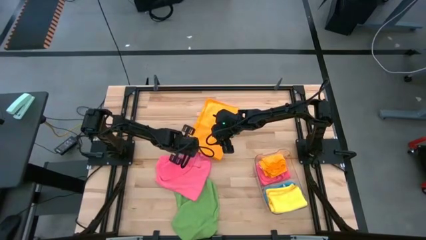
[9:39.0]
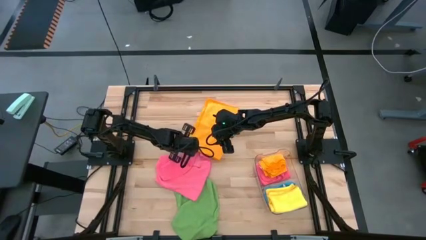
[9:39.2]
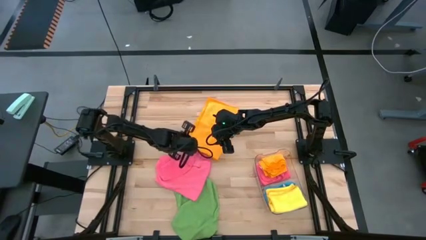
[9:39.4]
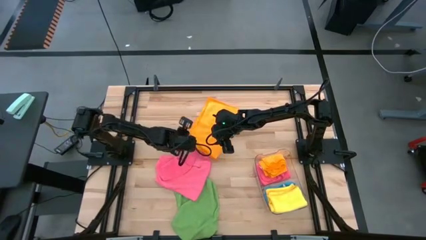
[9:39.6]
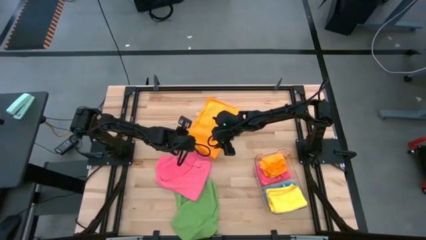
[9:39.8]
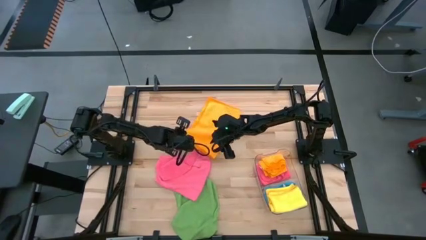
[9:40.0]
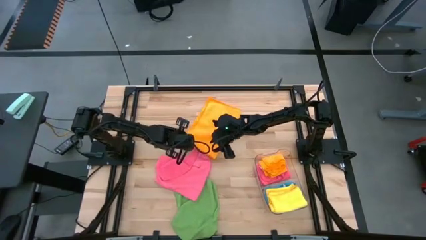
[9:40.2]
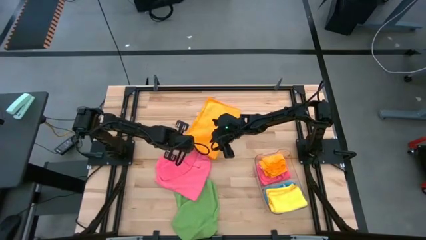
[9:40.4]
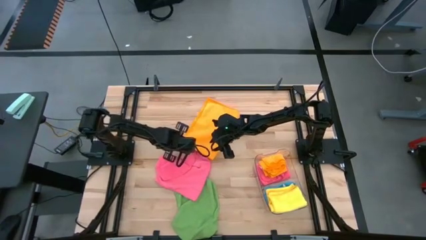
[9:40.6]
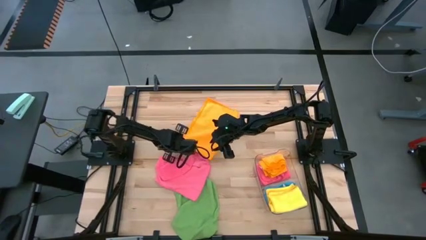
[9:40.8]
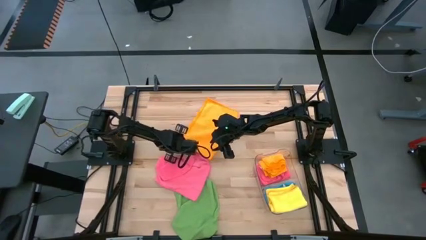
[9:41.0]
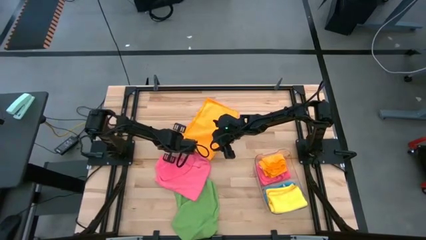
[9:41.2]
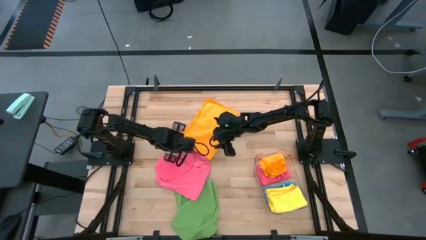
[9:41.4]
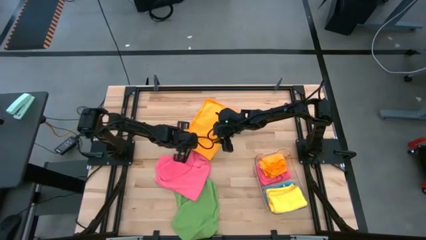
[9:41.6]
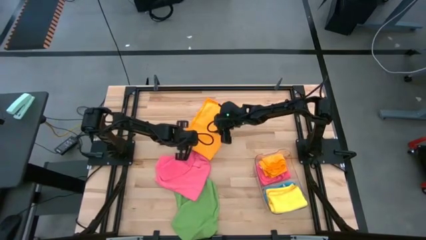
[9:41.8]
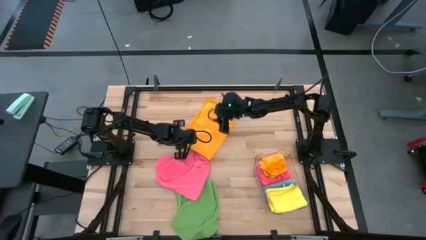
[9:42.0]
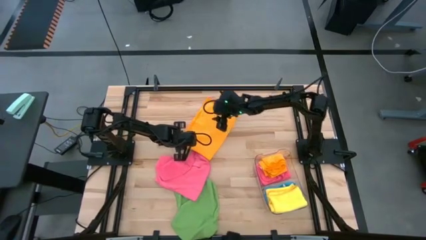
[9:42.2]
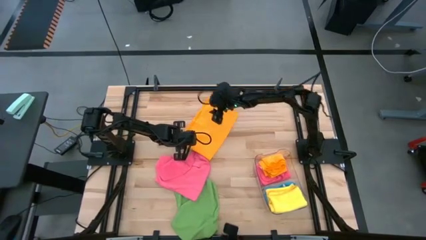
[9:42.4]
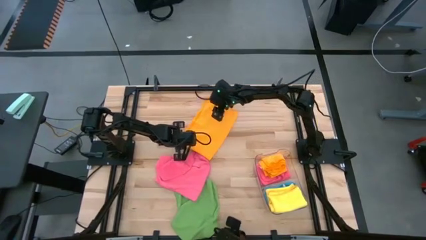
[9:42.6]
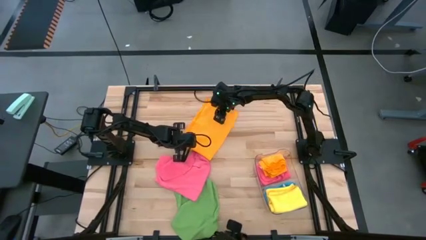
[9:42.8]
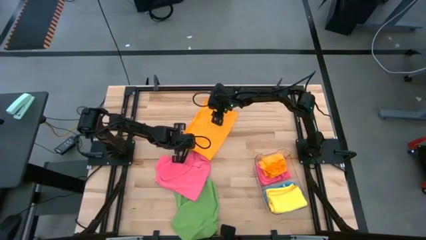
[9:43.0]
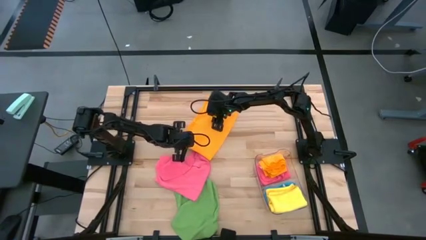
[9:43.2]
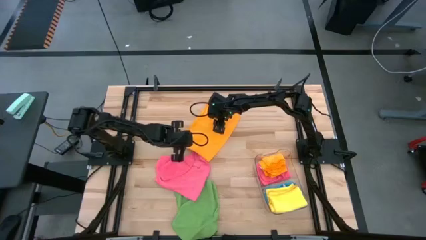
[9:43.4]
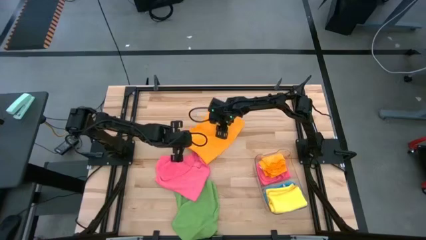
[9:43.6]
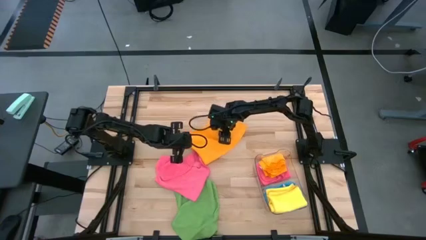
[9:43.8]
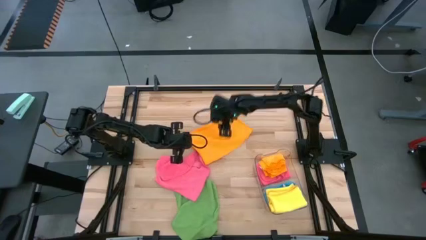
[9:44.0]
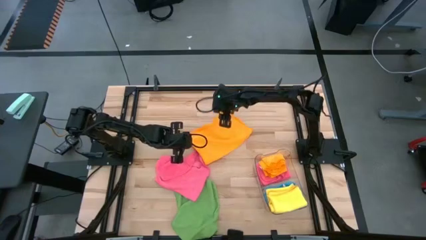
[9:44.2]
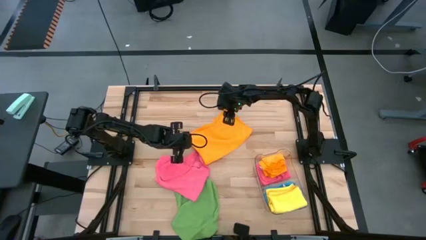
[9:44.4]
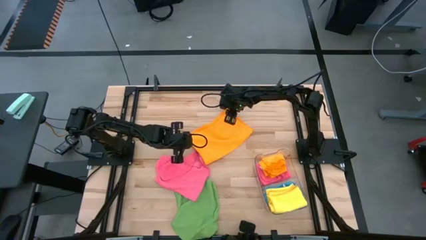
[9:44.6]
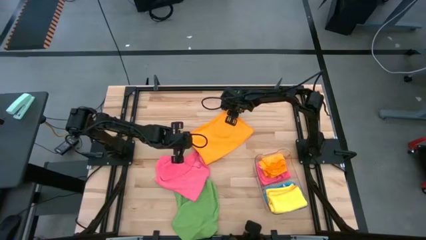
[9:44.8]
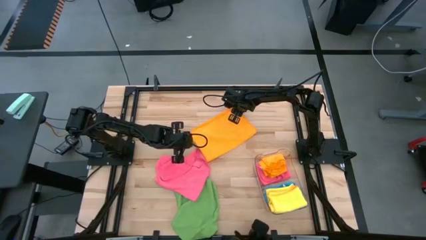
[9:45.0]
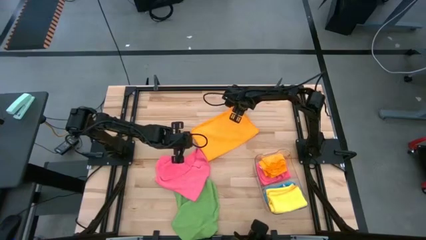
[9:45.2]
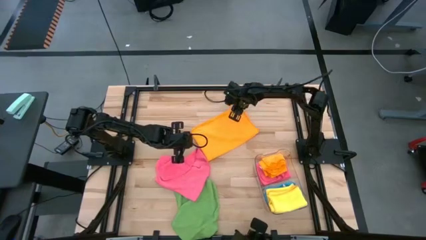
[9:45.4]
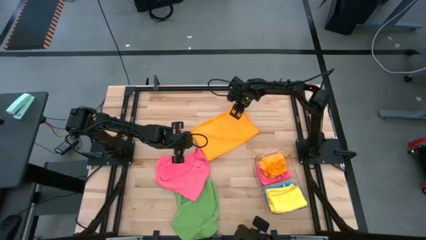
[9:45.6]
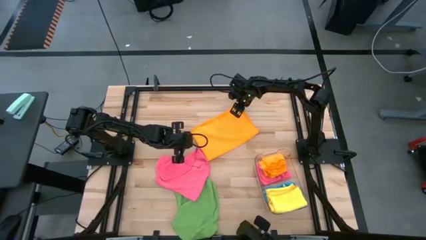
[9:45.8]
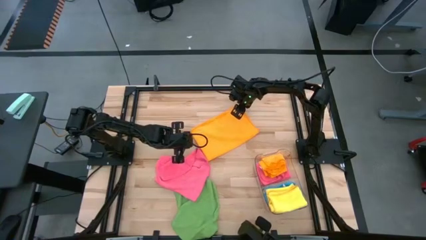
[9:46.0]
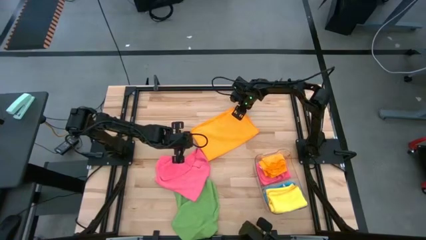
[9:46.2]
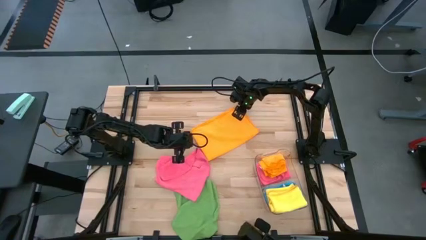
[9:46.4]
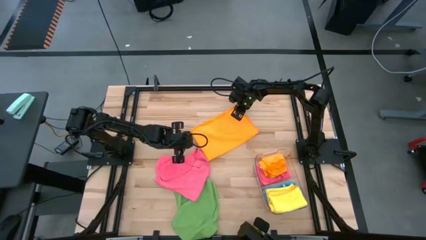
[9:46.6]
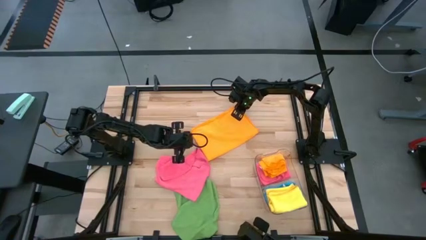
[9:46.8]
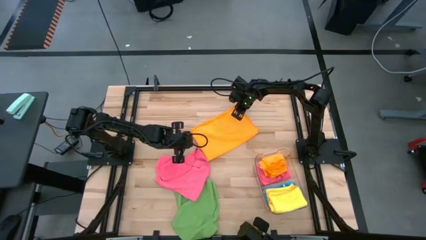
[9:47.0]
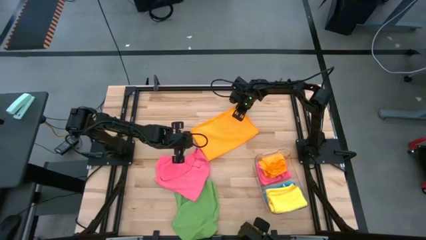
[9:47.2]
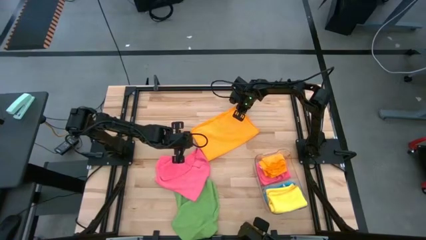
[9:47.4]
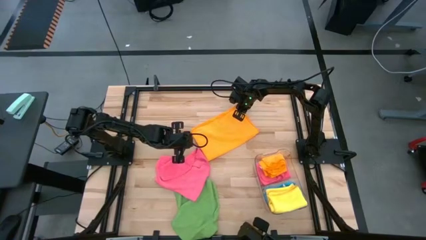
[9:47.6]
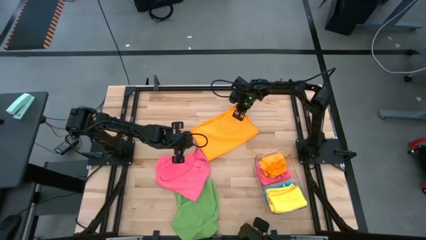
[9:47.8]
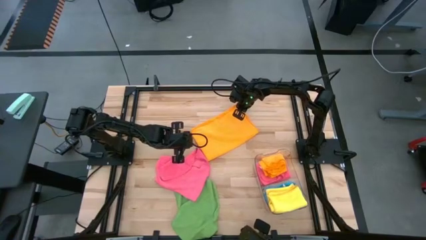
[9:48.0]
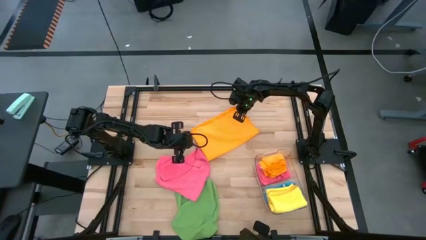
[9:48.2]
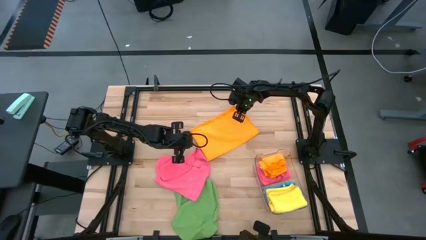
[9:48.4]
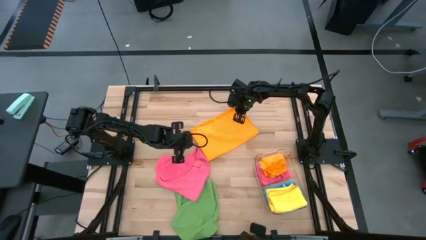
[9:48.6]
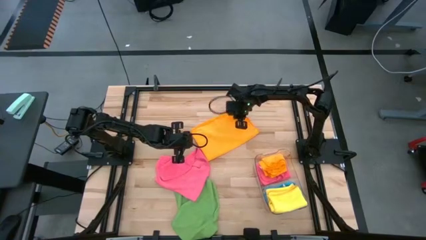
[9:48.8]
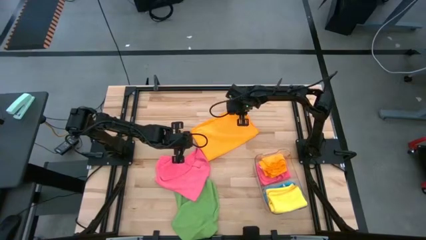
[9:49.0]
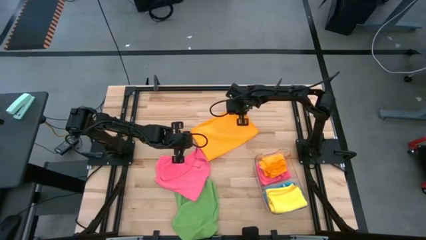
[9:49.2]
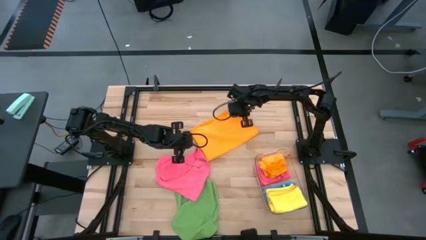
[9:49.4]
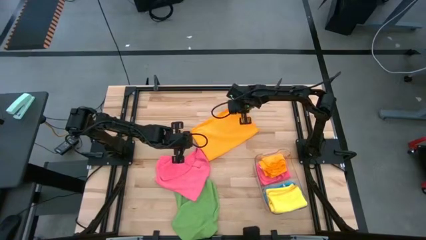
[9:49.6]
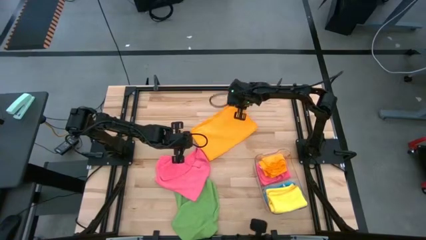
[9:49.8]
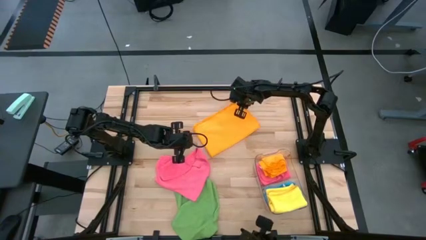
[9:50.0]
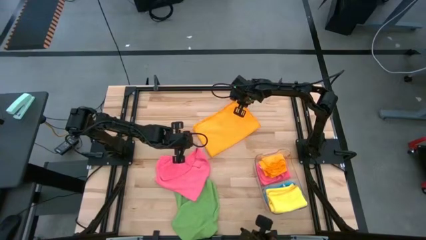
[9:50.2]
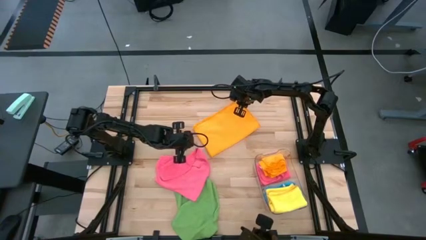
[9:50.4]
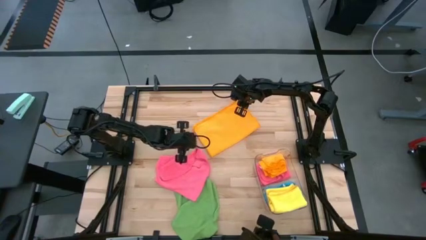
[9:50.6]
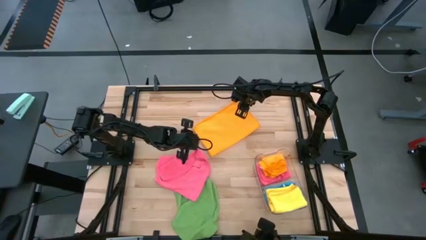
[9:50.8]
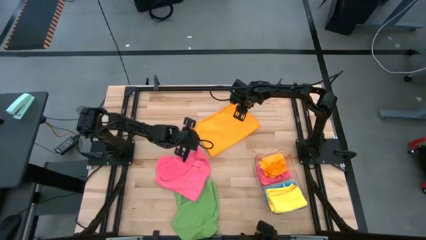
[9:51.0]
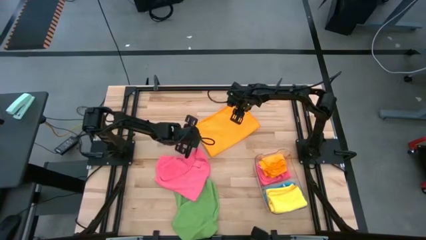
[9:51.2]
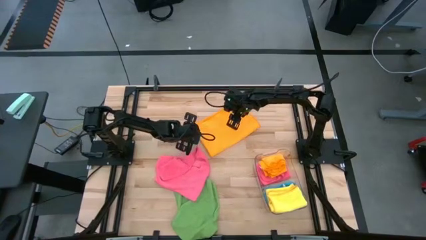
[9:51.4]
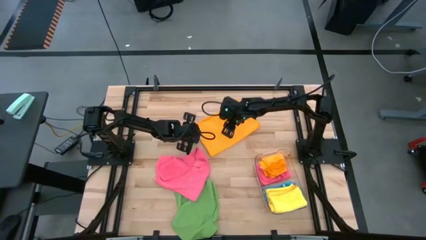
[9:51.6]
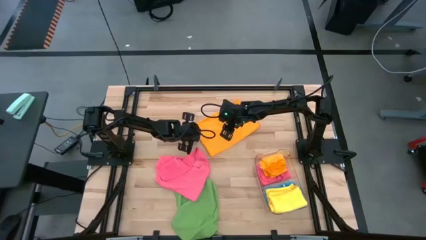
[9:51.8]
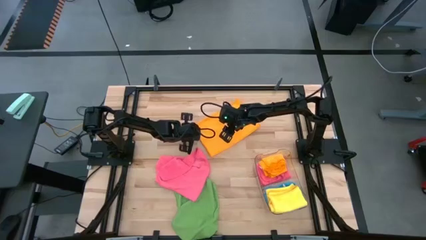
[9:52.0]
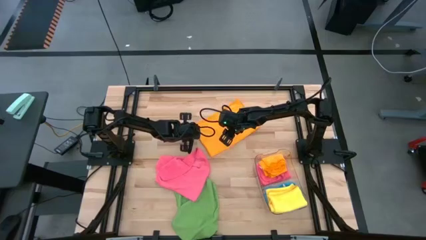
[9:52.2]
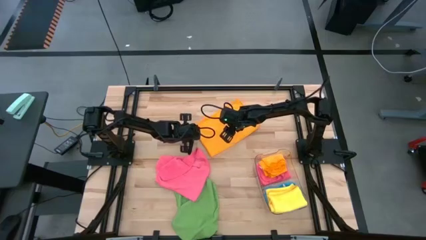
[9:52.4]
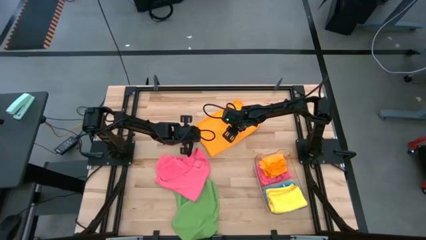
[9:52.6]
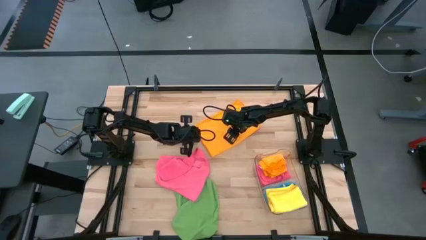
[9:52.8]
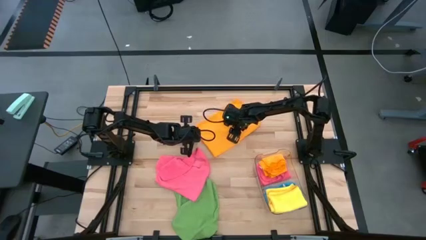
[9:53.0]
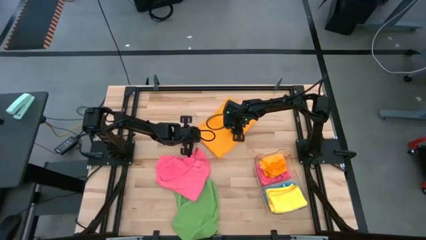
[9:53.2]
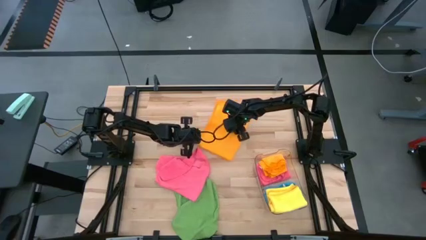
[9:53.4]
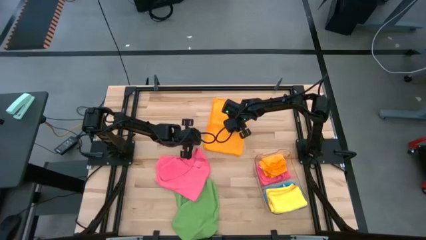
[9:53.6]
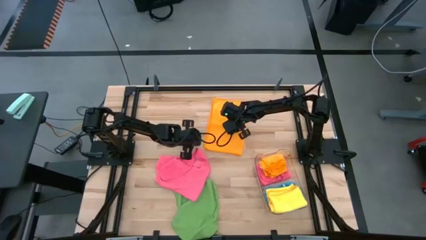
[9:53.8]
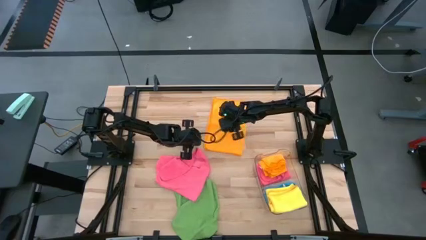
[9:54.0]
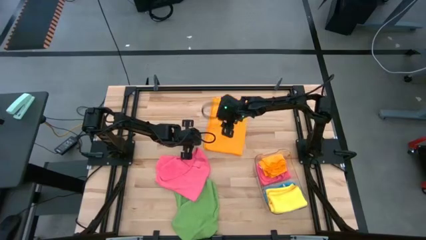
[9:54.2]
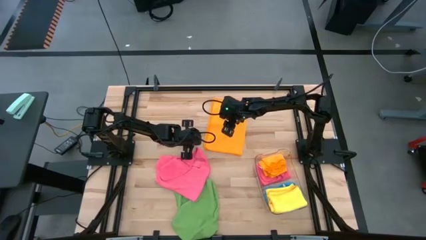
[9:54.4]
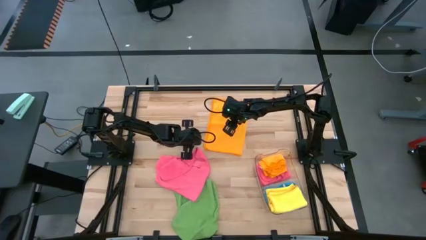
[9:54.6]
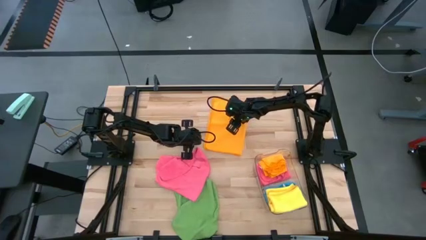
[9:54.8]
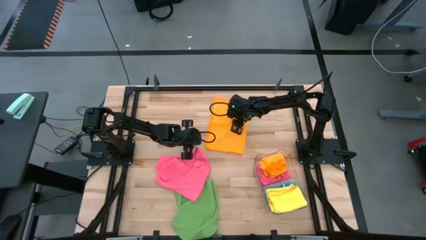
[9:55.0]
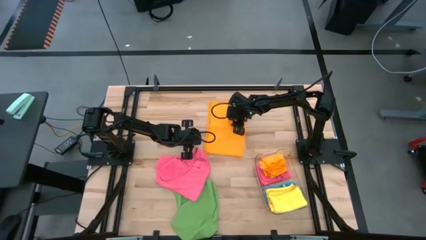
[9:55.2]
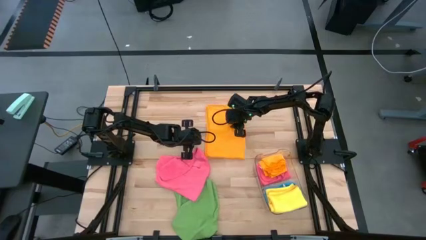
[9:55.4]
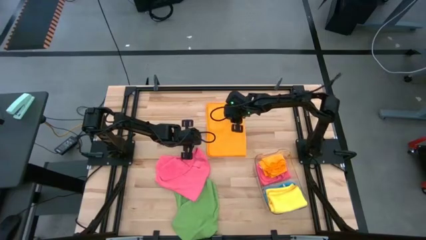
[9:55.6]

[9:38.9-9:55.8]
Task: Fold microfiber towels
Fold the orange towel
